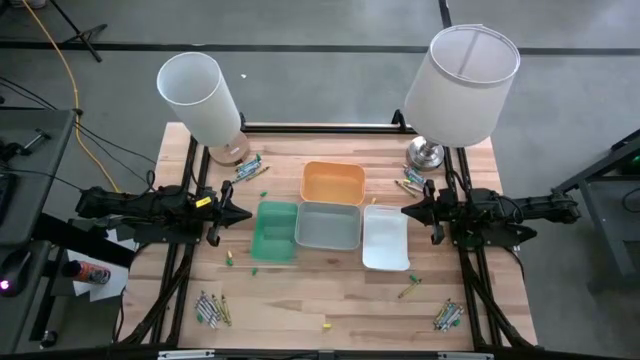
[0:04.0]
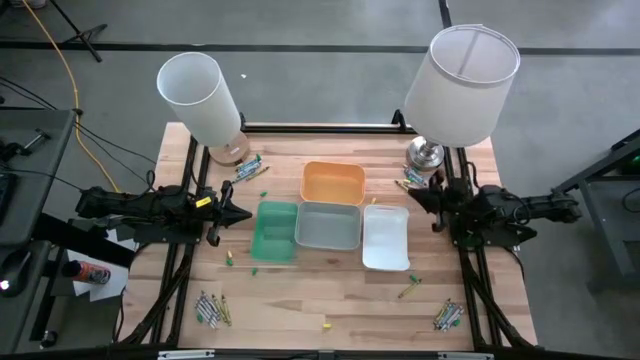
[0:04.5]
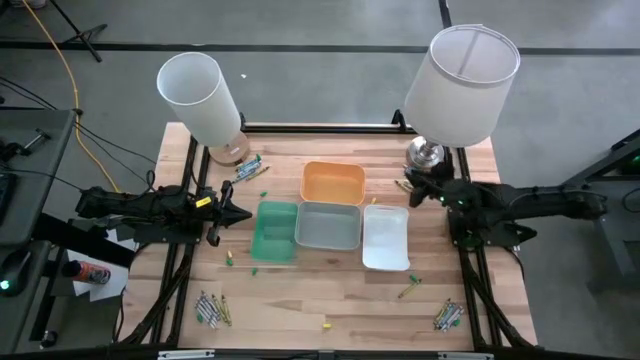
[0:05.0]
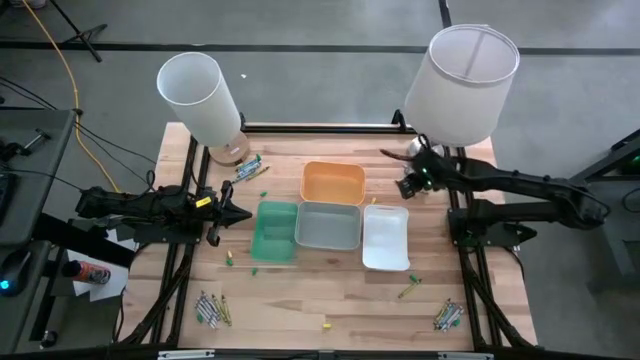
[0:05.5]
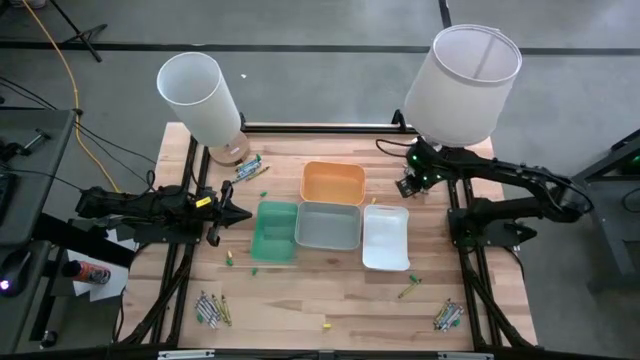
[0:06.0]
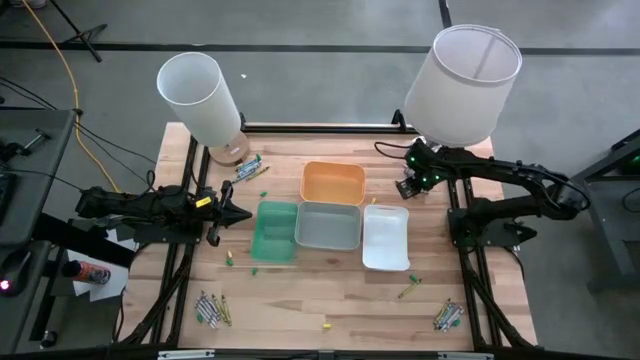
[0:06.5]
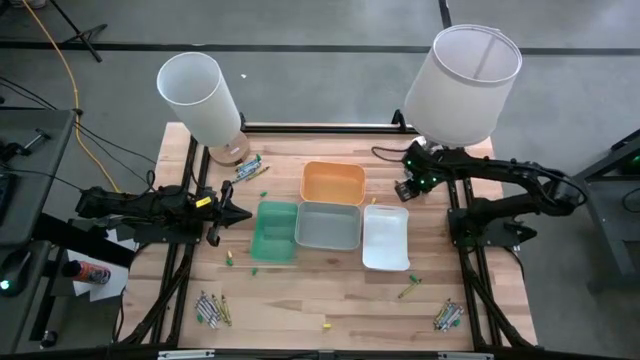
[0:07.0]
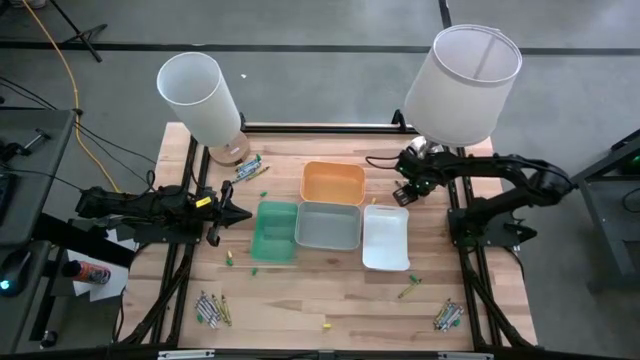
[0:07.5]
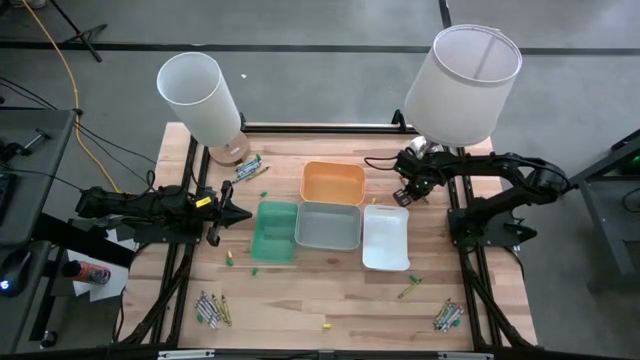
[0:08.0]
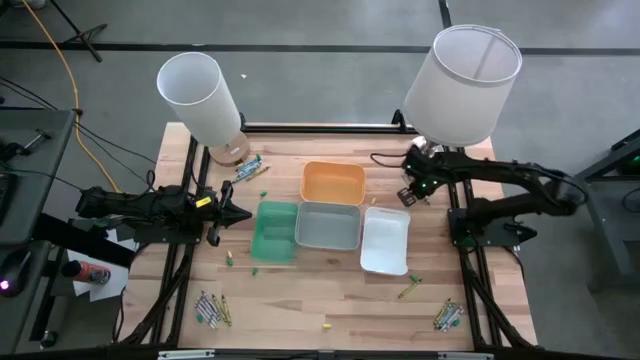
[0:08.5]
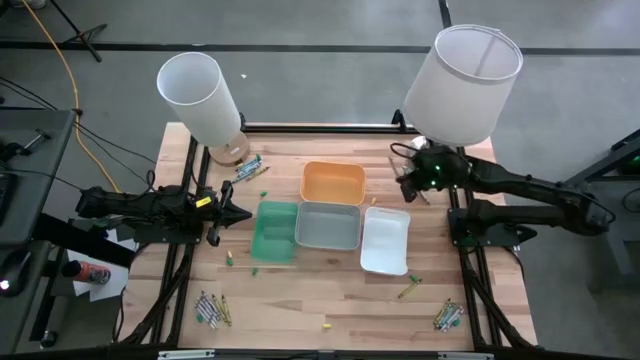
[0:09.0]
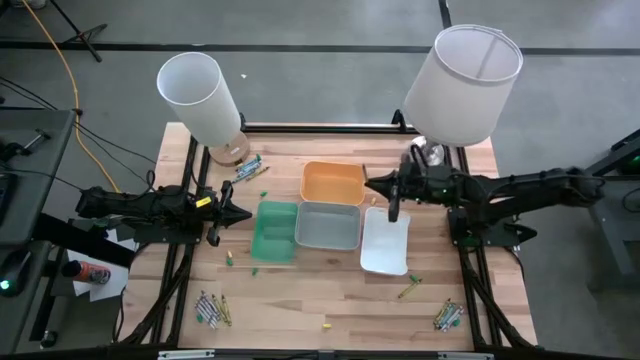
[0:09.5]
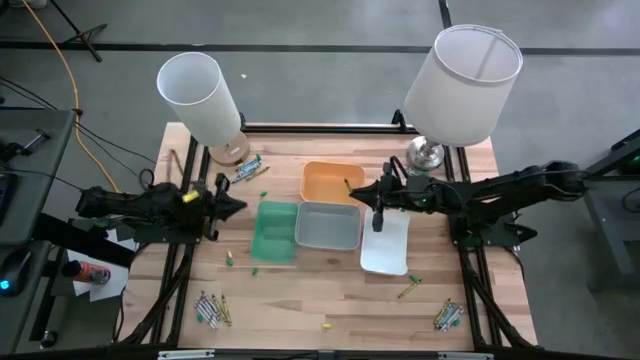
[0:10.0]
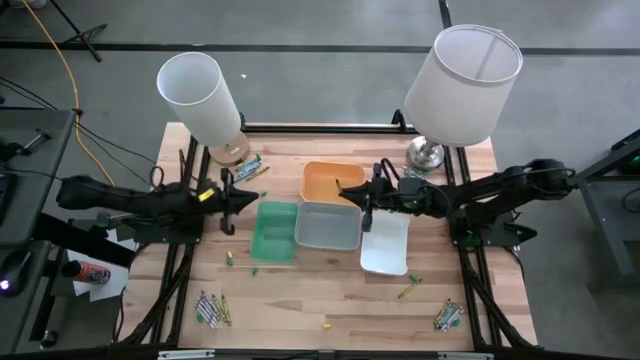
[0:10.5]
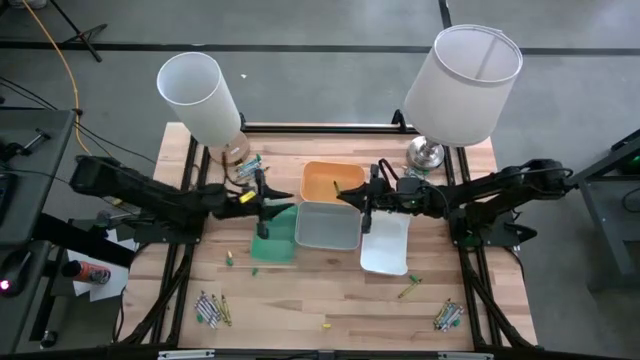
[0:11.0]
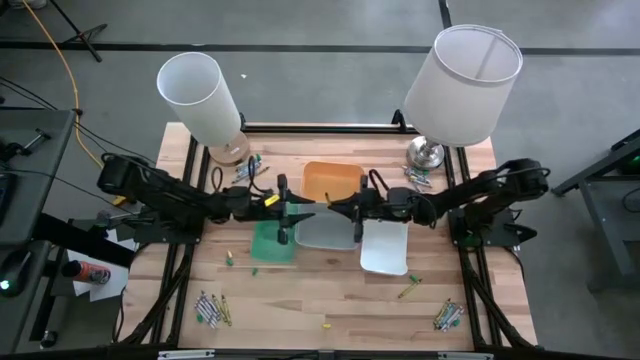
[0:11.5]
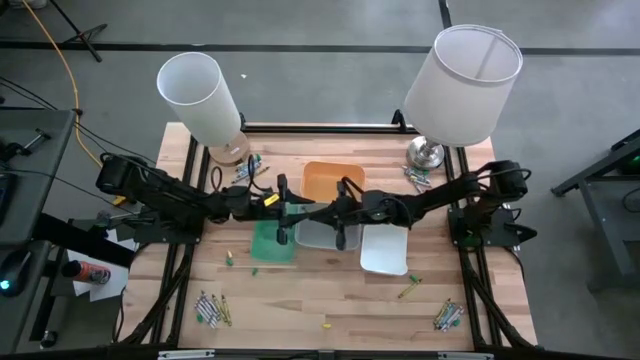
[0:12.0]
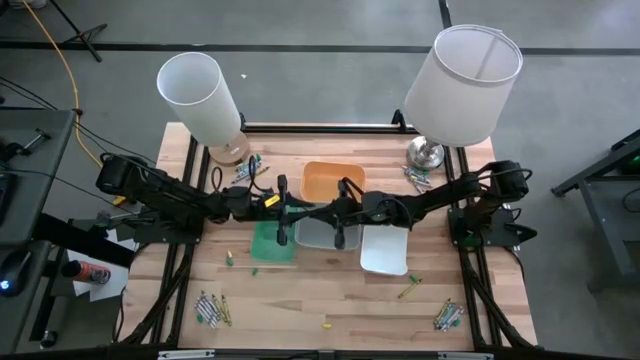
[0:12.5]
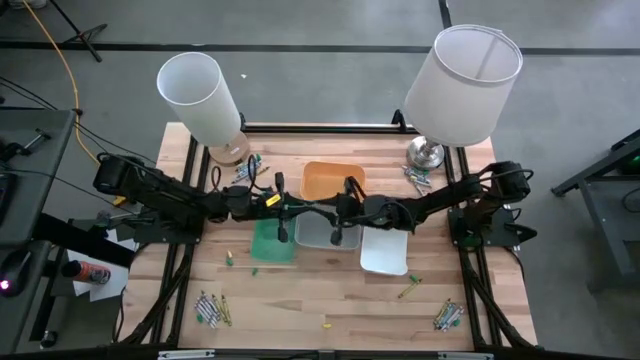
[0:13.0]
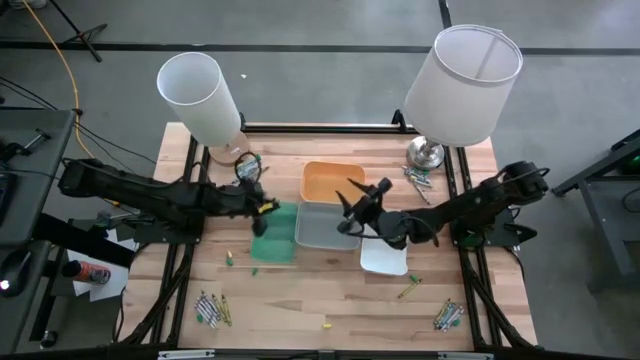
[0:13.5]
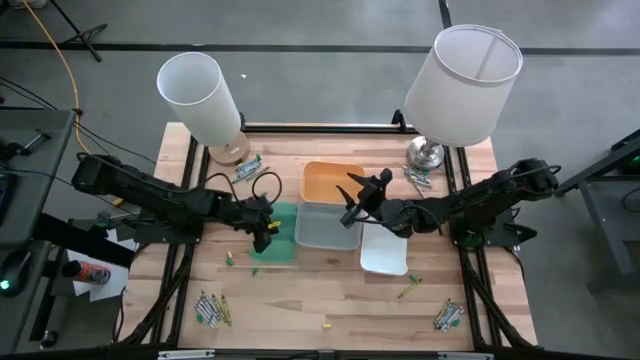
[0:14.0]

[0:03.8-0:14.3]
Task: Sort crayons
Put the green crayon into the green bin

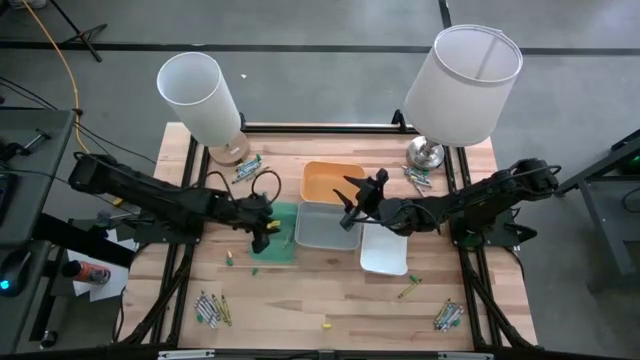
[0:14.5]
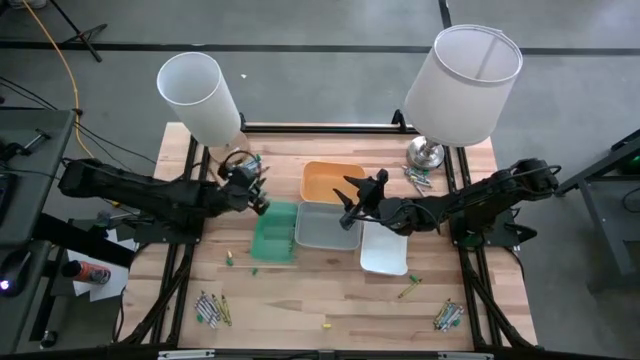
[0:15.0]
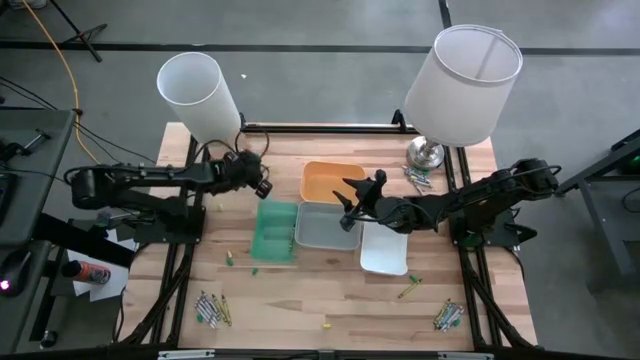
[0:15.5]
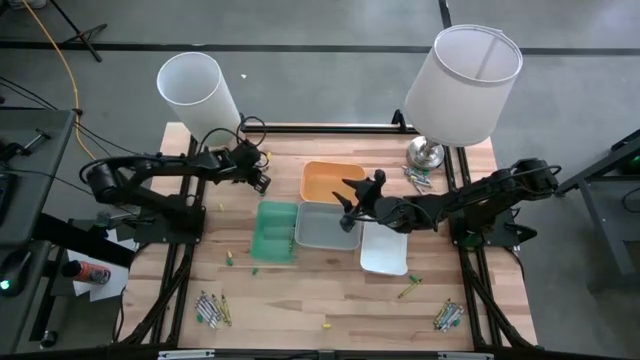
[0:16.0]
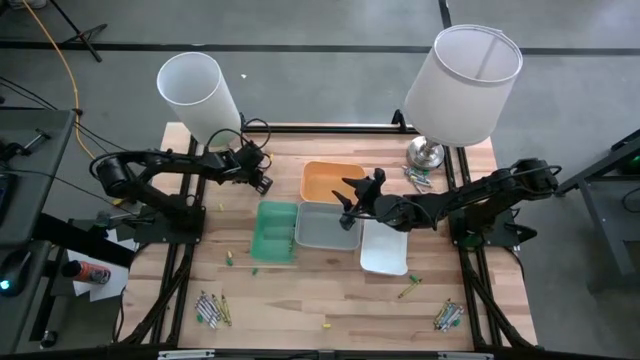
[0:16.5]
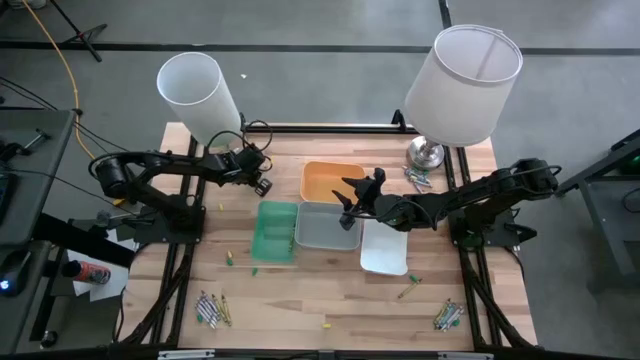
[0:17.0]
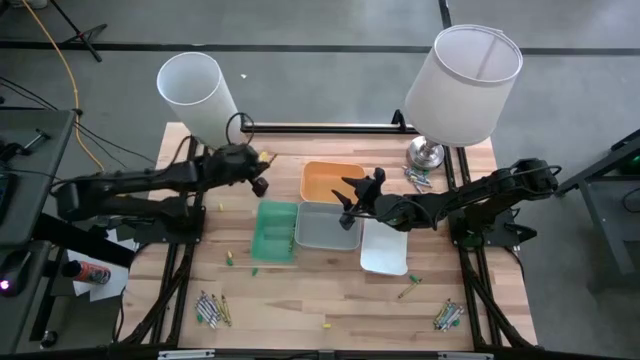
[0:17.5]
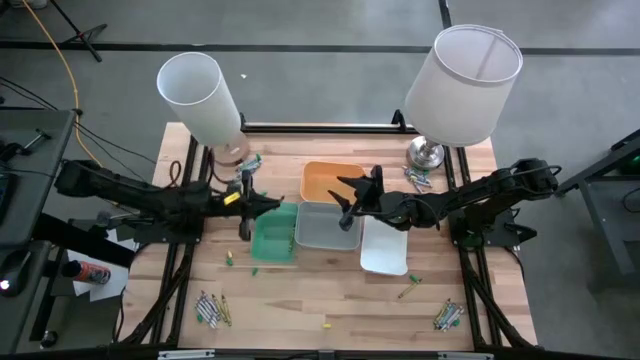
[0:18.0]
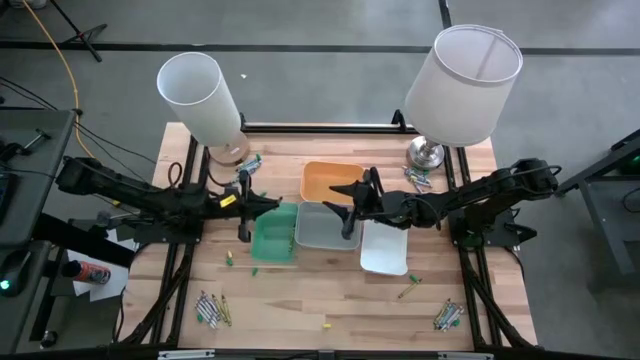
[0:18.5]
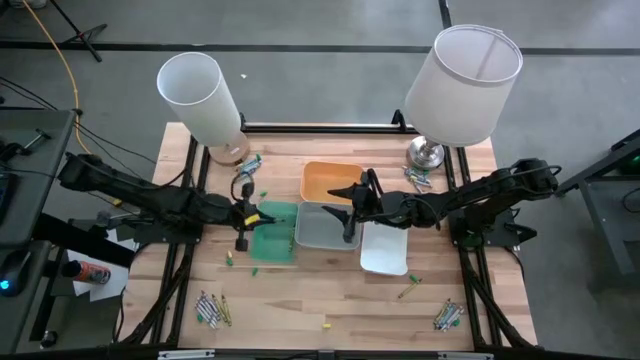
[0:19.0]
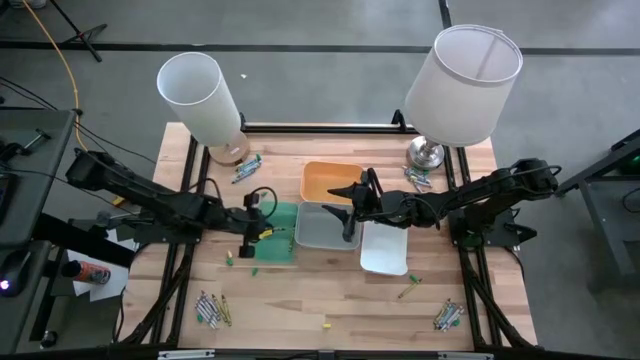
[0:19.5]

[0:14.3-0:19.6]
Put the green crayon into the green bin

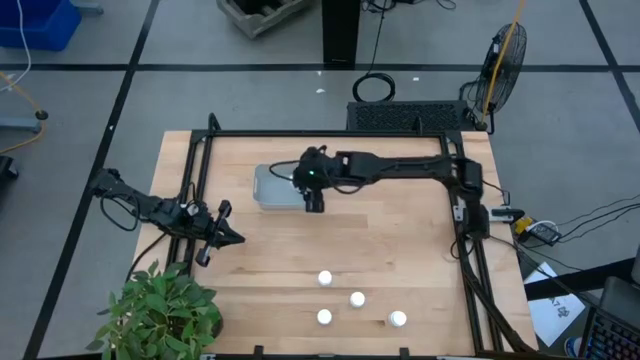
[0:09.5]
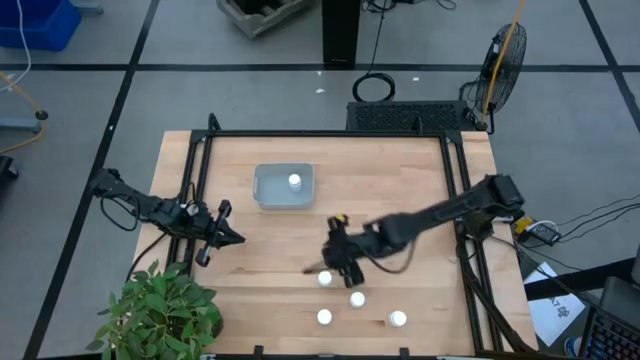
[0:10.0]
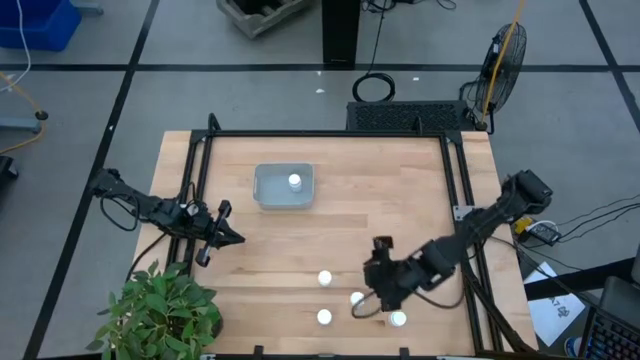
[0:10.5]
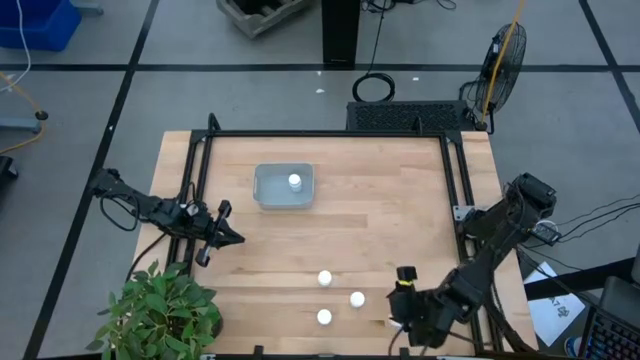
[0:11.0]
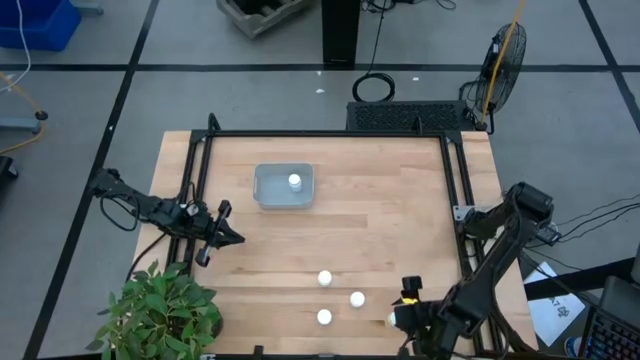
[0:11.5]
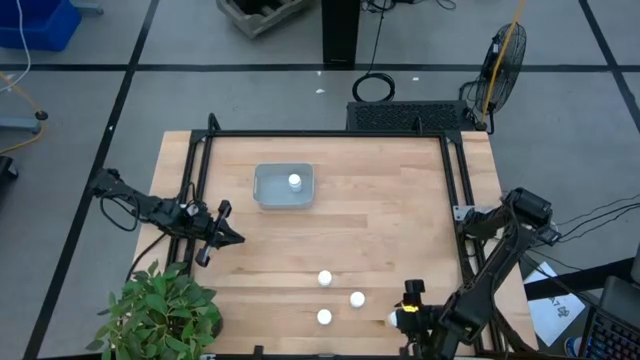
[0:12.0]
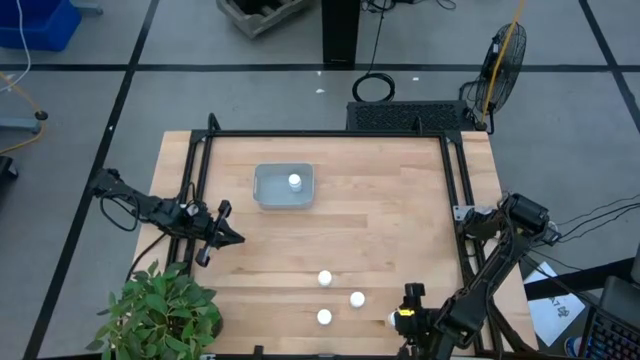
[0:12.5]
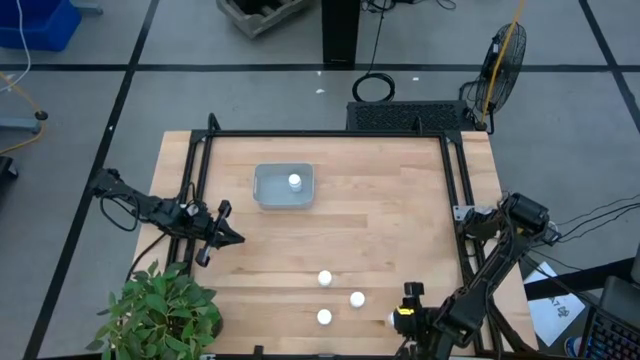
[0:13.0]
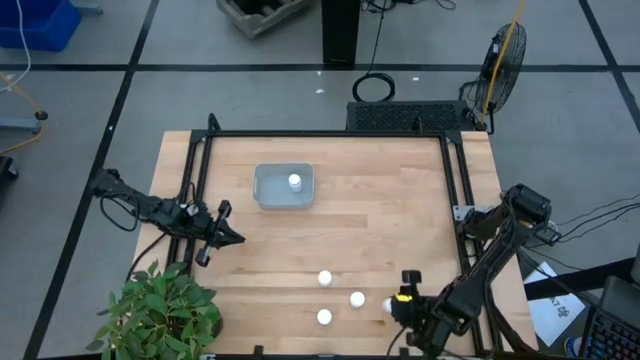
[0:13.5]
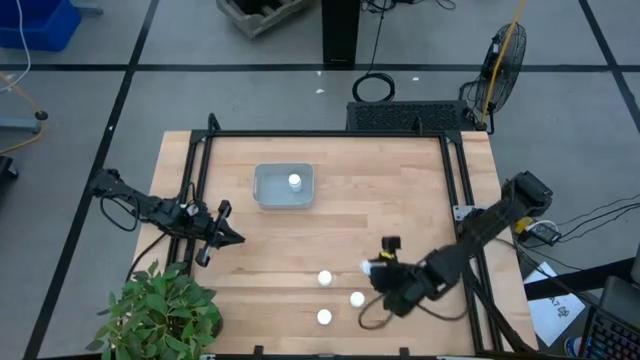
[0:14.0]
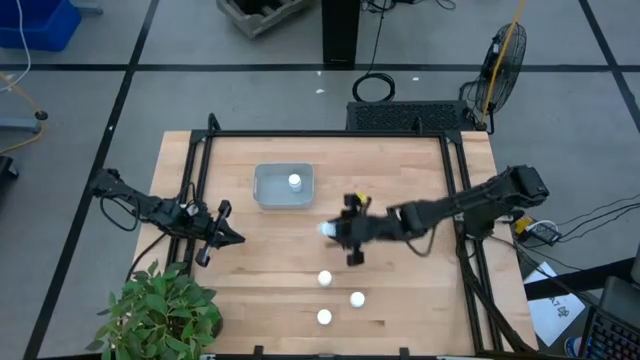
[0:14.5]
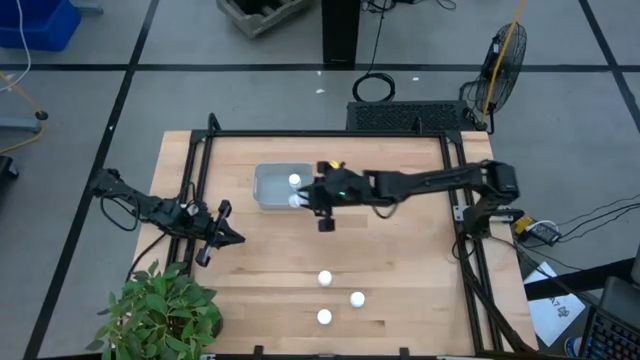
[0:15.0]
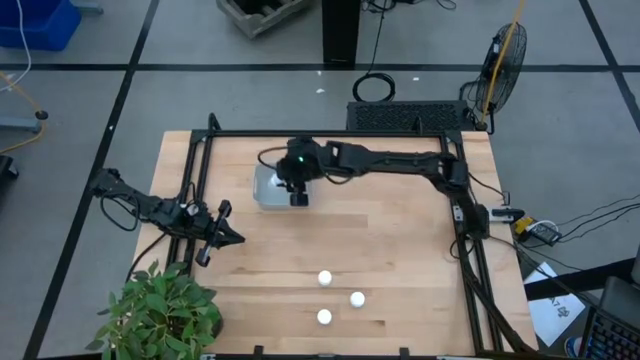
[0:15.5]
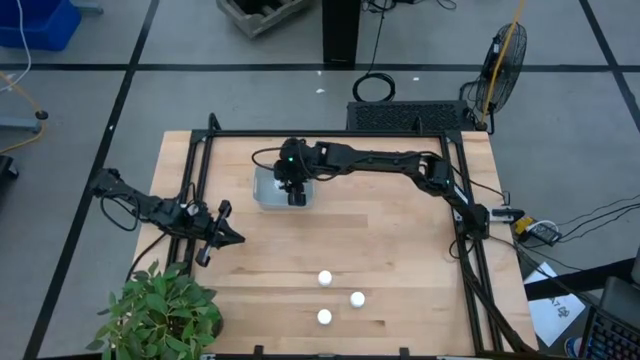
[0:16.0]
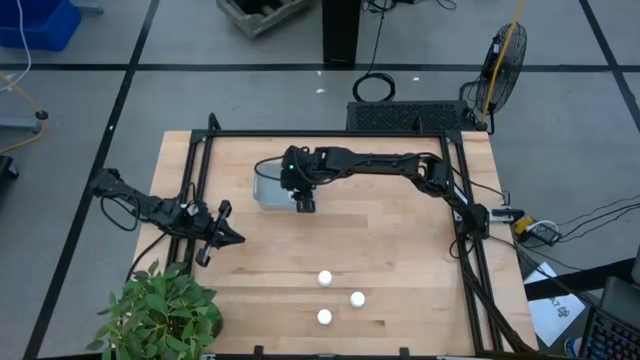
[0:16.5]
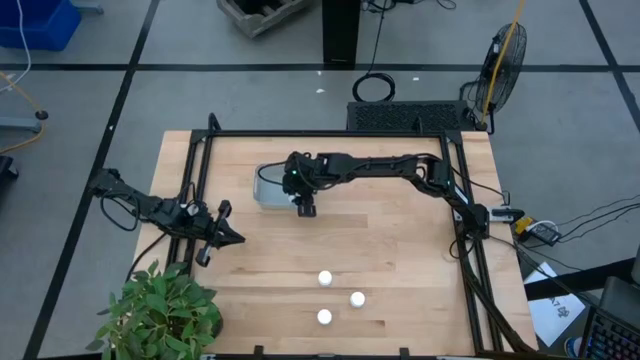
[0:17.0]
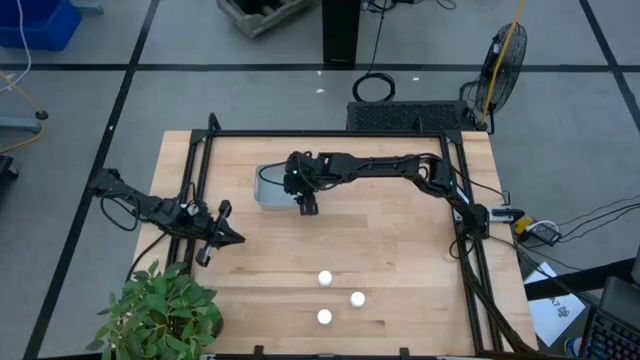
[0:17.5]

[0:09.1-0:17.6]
Task: Pick and place pill bottles into a basket
Put the white medicine bottle into the gray basket
